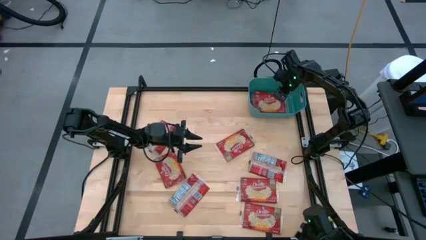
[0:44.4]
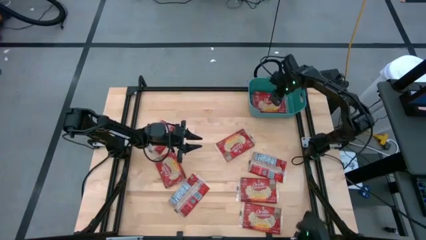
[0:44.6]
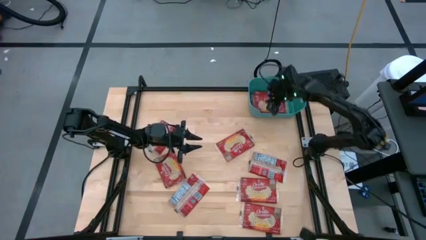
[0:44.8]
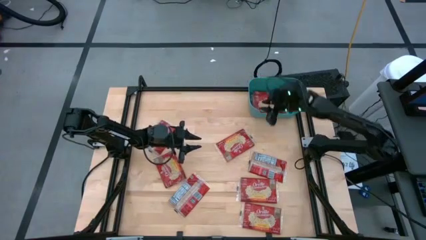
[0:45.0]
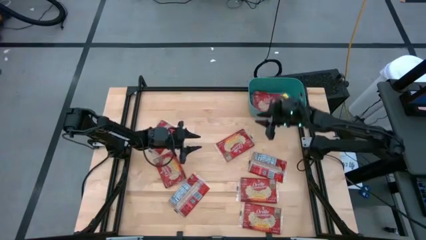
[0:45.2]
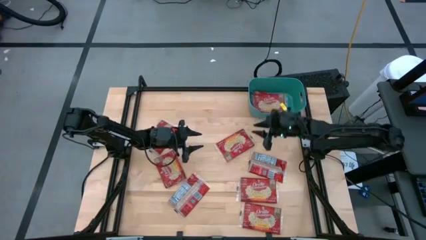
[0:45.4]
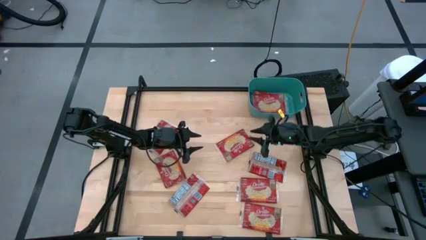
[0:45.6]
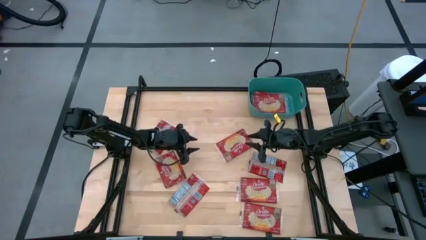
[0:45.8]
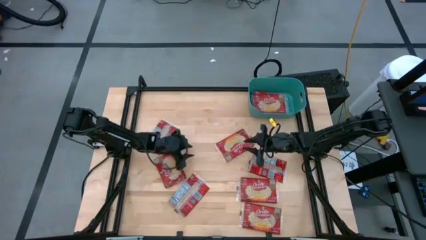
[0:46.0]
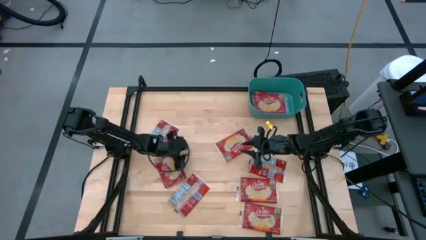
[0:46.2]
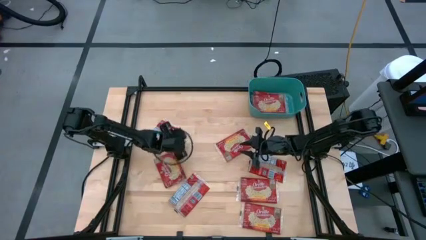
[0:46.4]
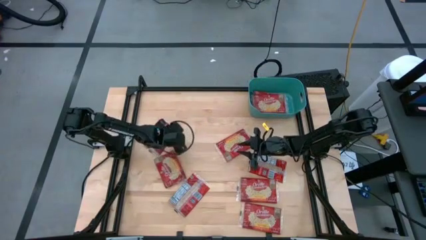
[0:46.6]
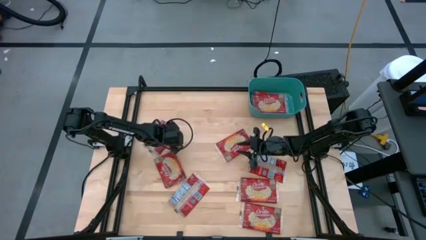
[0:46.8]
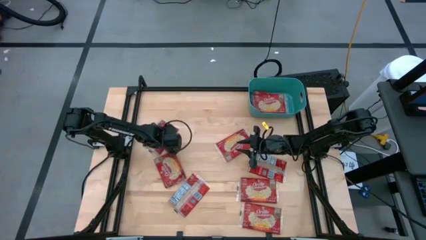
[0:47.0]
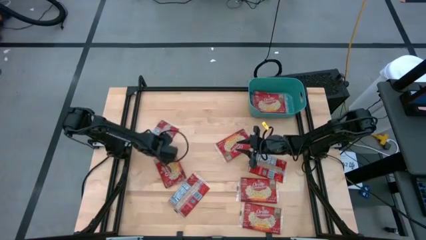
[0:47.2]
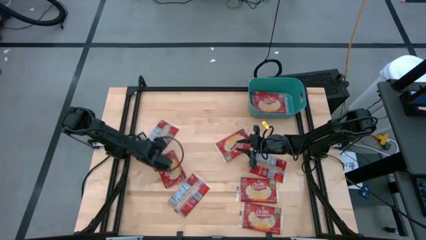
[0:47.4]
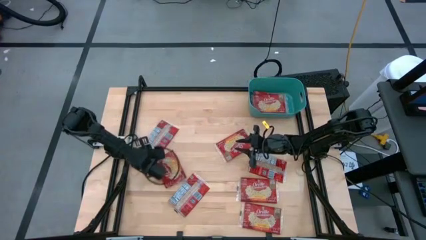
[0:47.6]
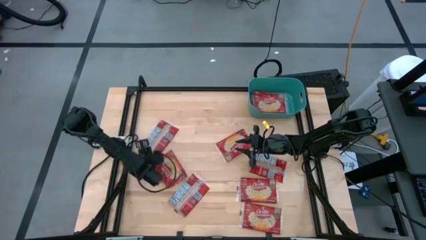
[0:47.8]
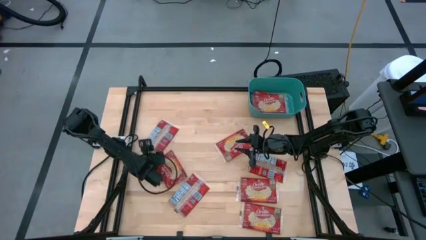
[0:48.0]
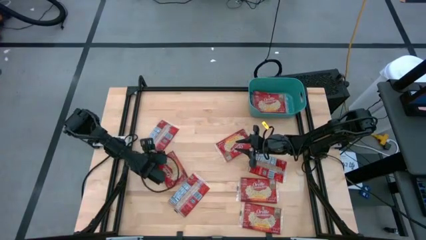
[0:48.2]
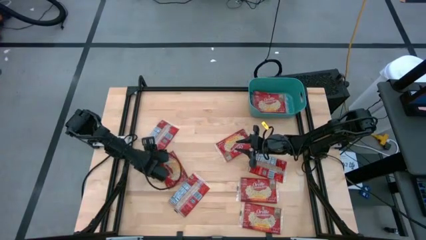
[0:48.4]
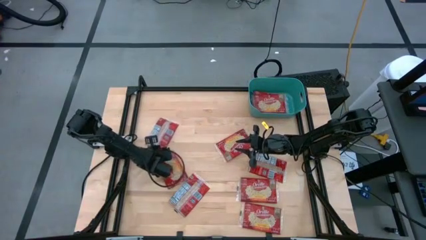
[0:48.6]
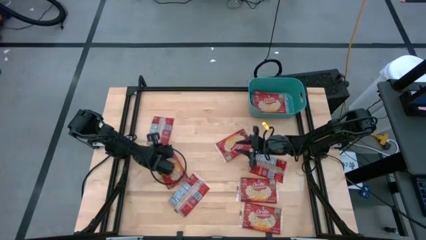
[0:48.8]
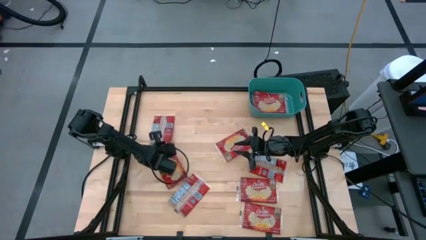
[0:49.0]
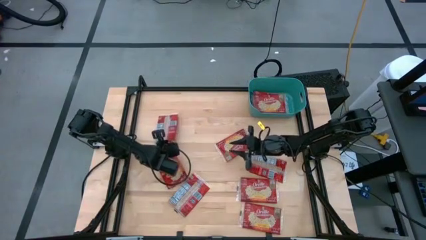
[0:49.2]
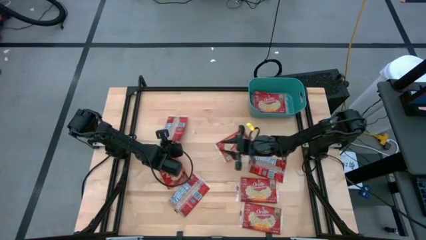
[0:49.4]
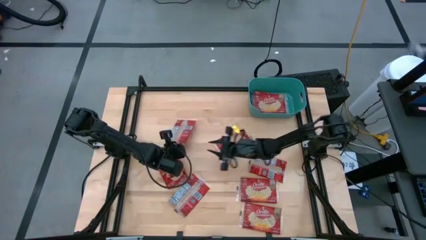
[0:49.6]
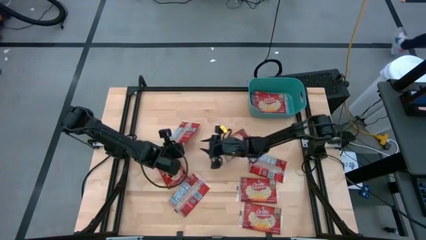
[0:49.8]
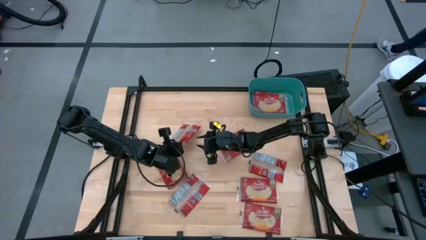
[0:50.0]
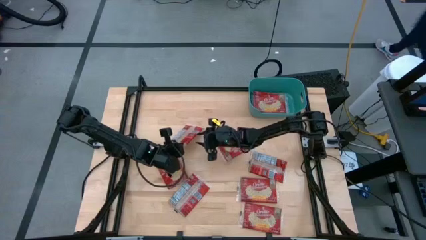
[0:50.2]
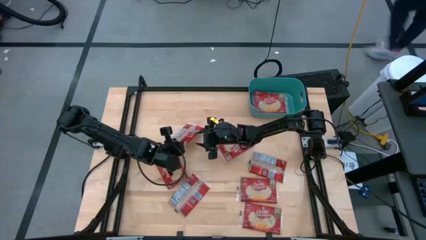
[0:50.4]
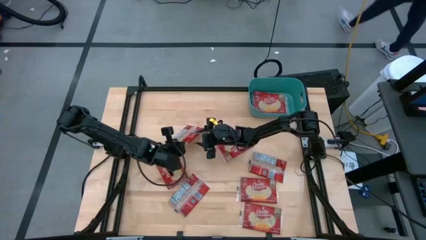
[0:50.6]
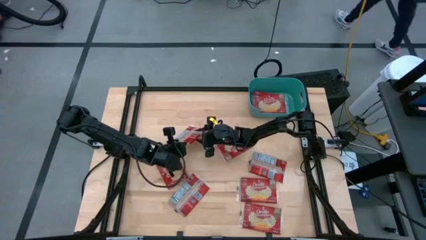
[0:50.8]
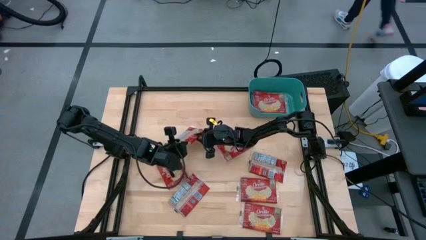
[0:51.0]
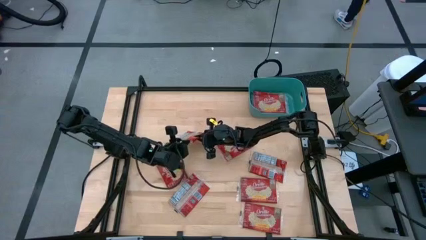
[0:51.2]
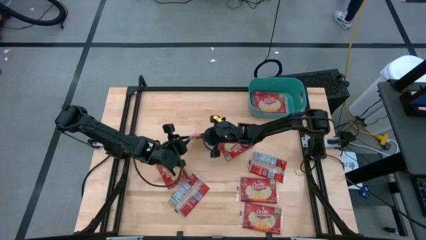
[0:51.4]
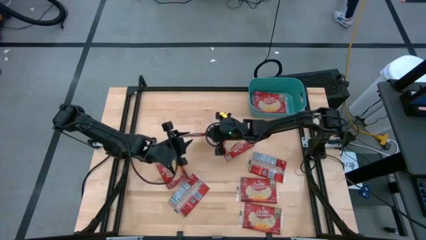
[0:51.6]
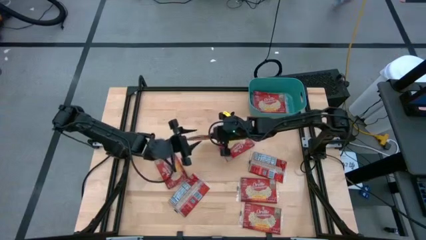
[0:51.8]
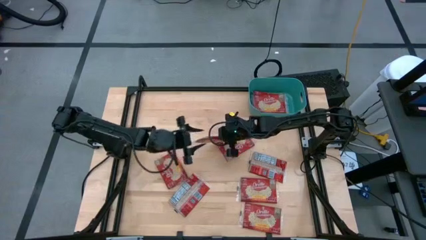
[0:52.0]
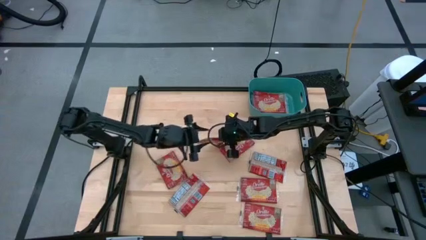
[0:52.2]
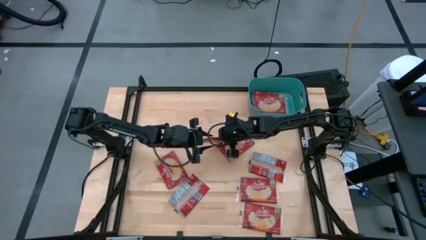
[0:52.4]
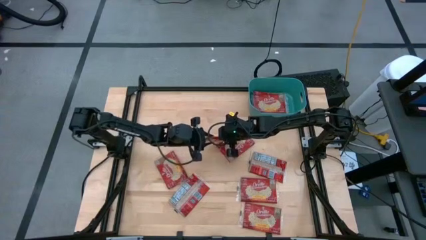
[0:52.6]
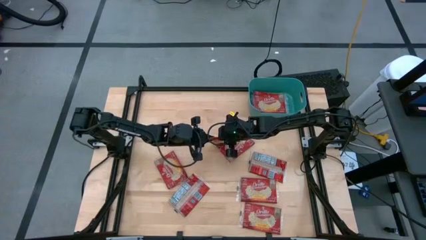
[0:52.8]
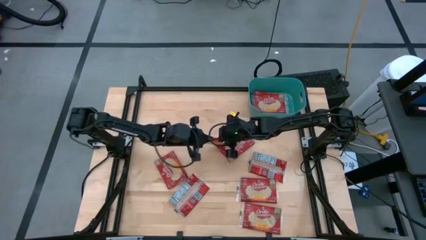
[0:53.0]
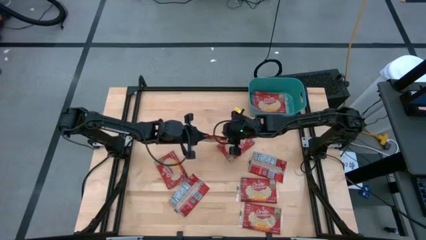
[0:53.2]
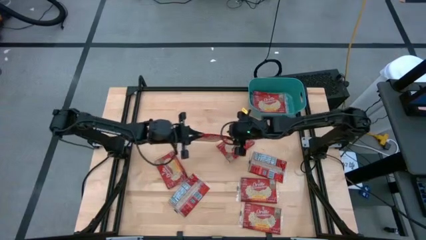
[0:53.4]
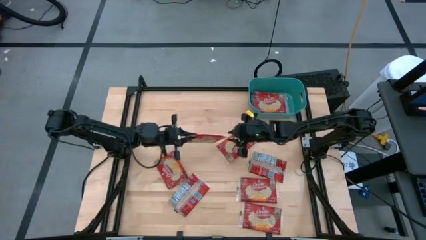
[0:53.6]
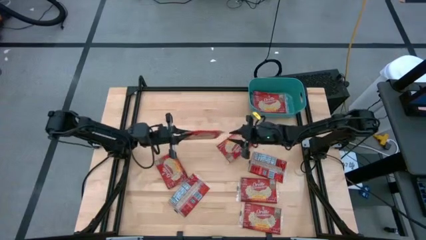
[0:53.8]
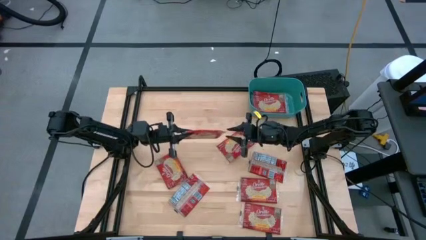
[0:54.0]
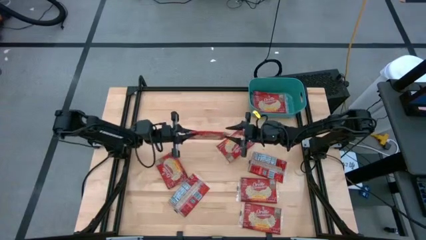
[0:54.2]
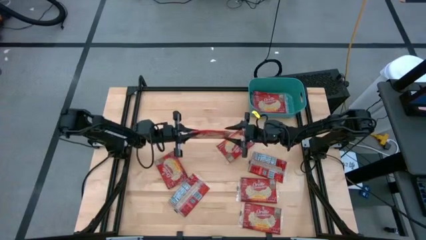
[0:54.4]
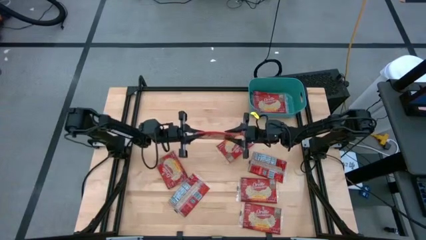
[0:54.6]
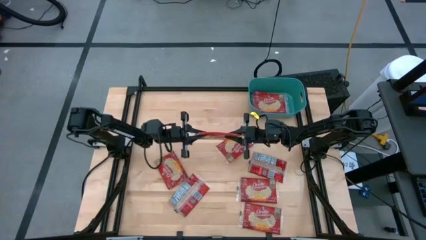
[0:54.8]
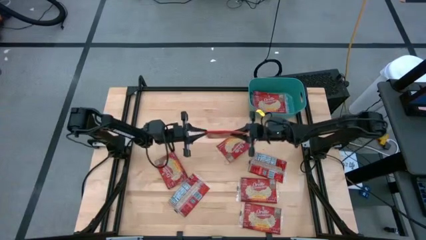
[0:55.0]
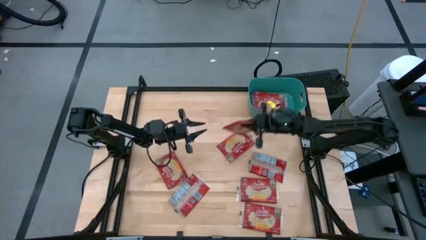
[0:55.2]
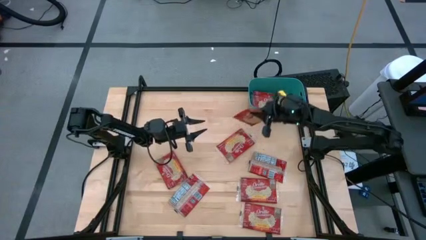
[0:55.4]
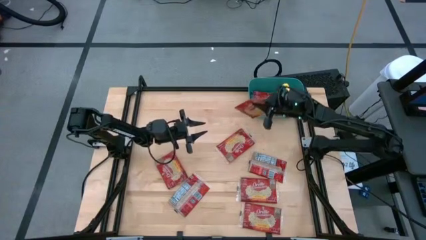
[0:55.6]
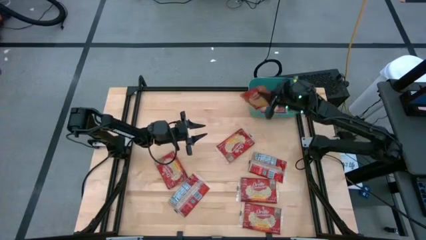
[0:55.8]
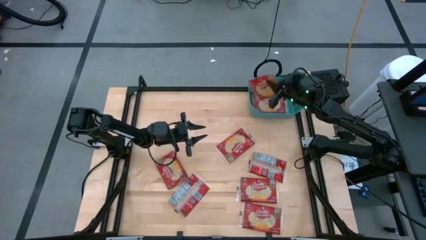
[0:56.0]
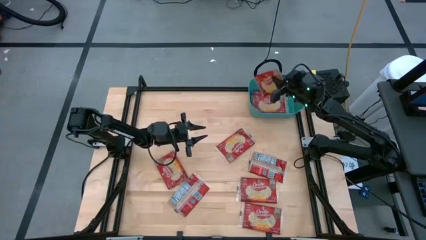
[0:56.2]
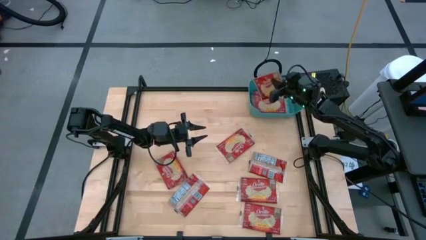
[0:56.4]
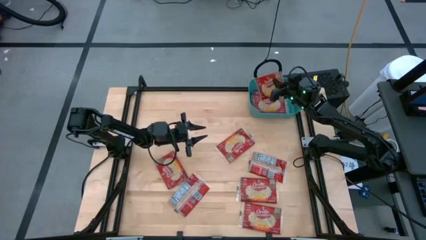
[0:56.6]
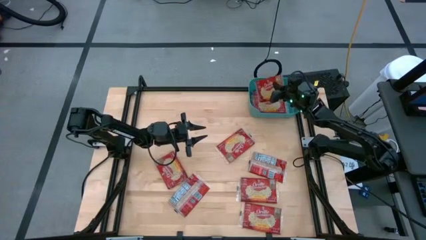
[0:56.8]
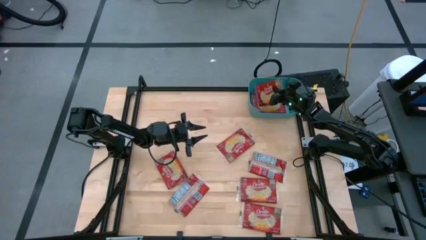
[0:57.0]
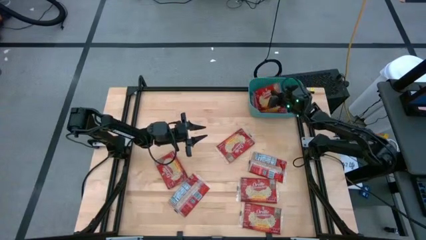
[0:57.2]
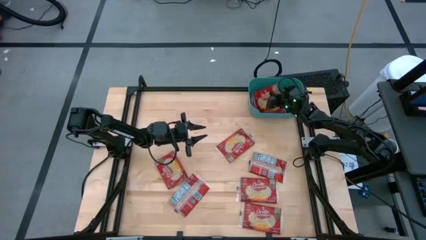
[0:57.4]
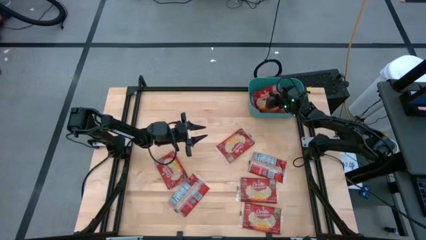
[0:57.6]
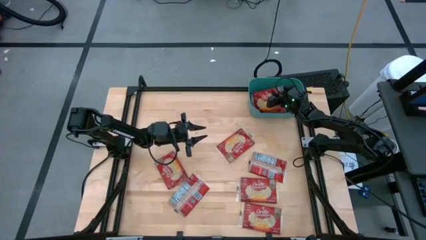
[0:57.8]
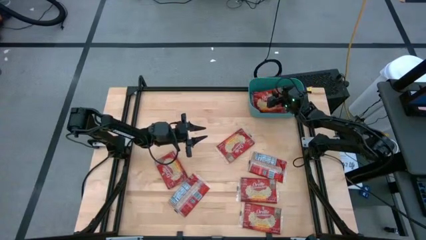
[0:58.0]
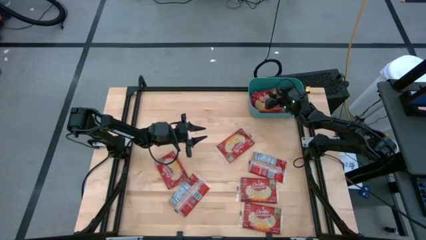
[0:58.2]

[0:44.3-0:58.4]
Task: Sort popcorn bags into baskets
Put the red popcorn bag into the blue bin

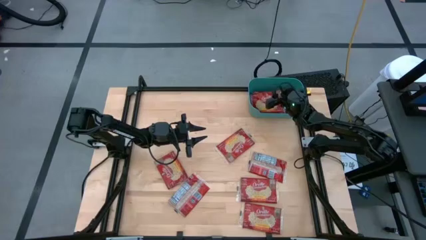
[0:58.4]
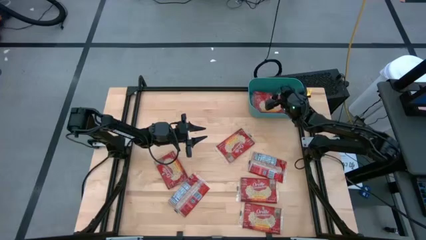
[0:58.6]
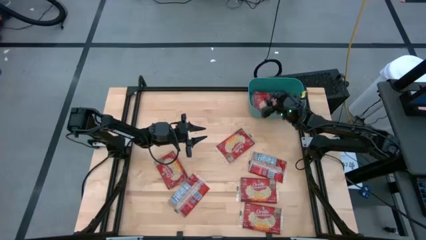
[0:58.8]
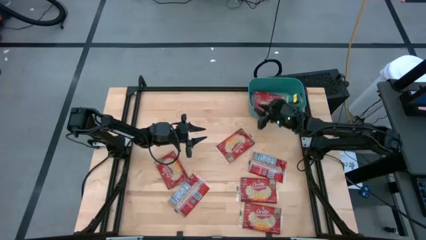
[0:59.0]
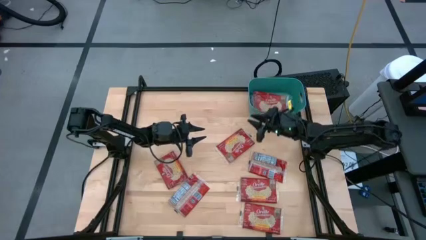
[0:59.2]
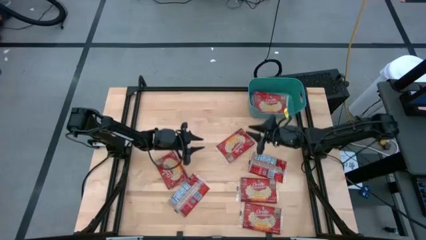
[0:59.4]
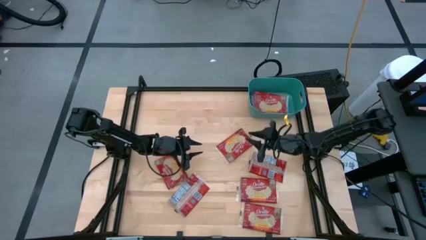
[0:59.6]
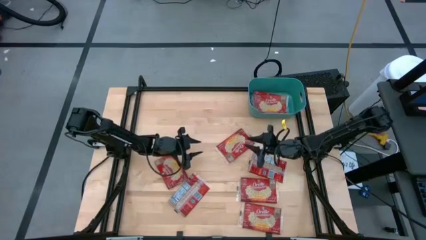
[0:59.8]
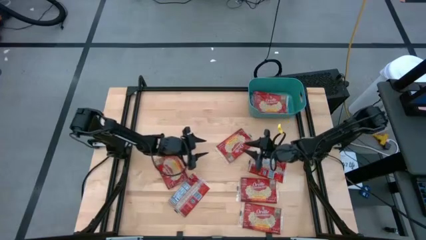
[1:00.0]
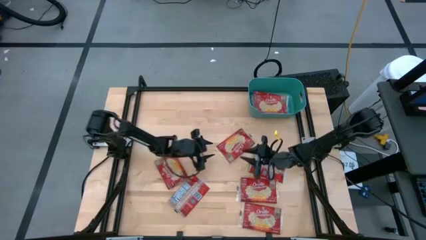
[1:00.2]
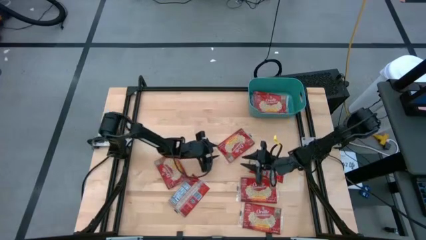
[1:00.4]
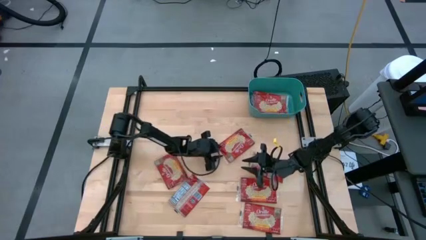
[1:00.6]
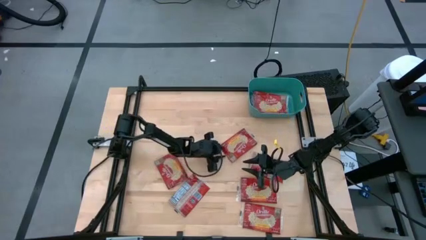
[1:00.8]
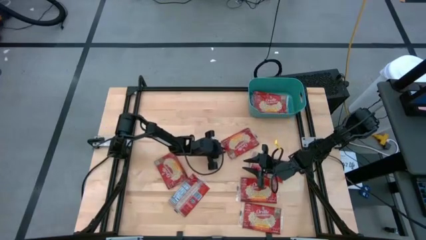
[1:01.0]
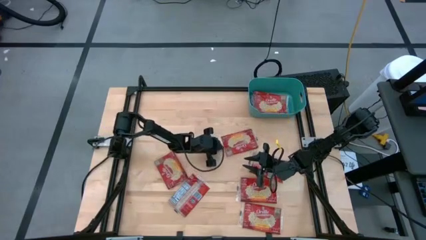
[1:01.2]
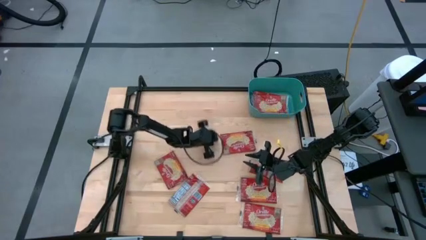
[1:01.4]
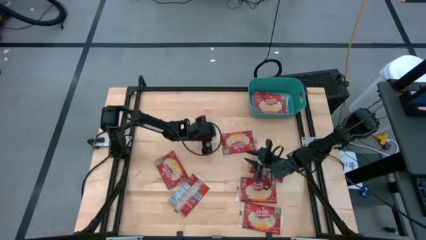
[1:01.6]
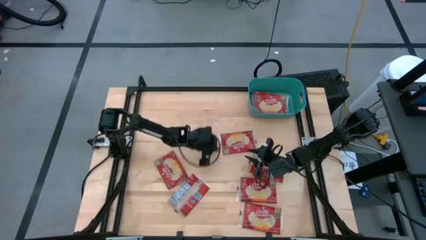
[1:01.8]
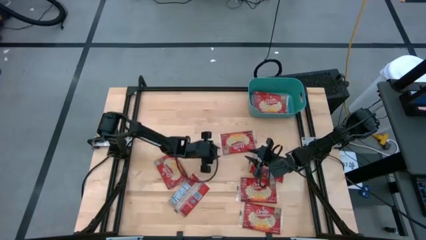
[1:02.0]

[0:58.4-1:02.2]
Put the red popcorn bag into the blue bin
